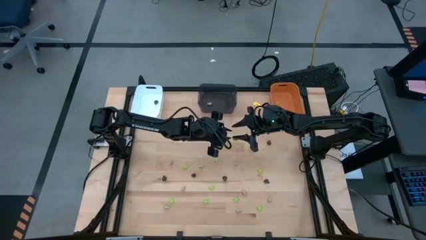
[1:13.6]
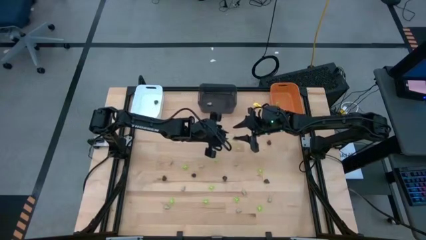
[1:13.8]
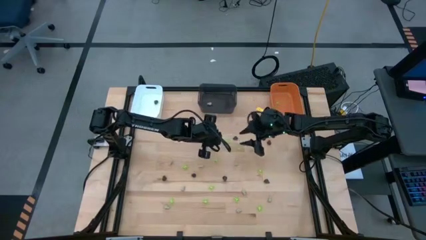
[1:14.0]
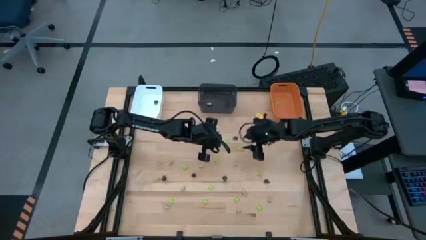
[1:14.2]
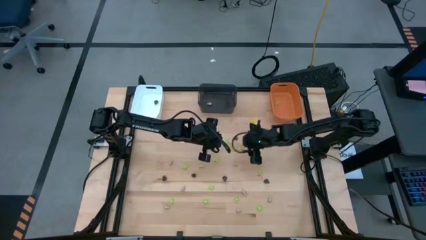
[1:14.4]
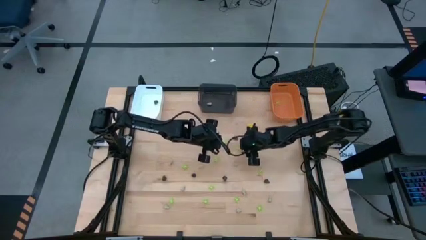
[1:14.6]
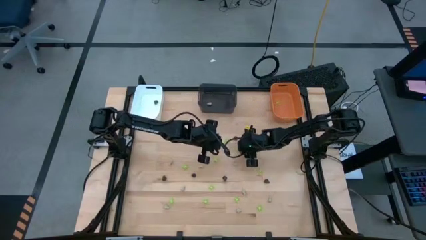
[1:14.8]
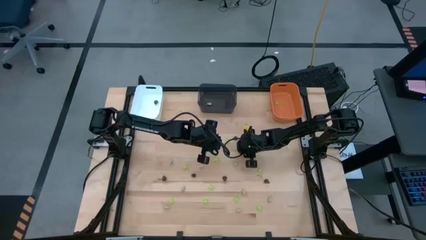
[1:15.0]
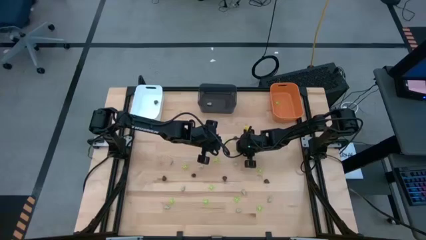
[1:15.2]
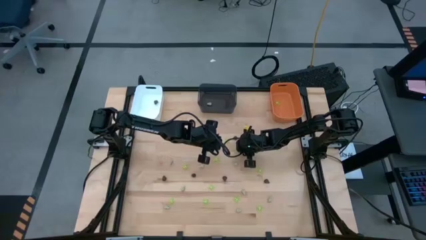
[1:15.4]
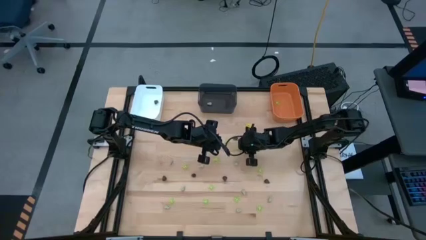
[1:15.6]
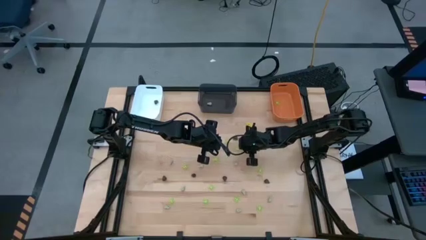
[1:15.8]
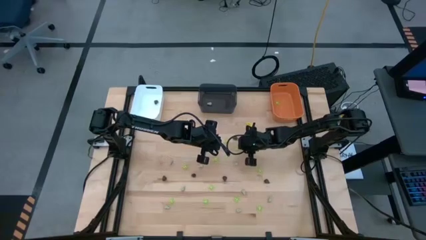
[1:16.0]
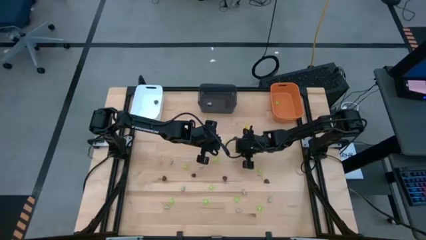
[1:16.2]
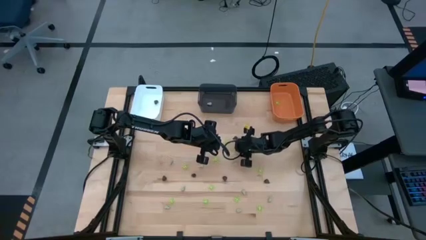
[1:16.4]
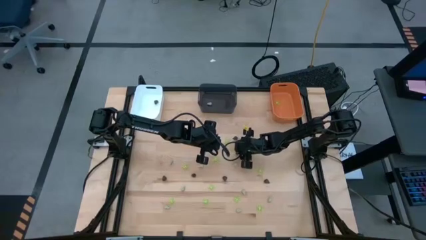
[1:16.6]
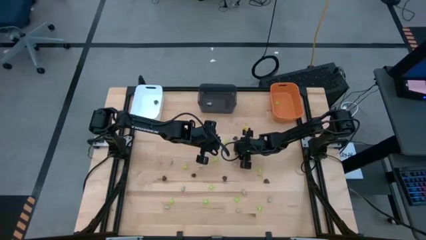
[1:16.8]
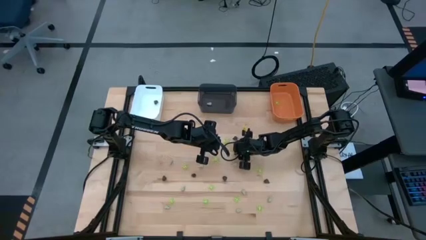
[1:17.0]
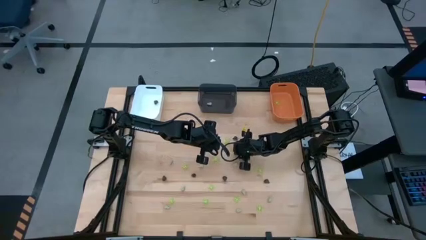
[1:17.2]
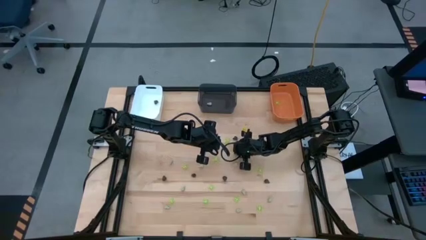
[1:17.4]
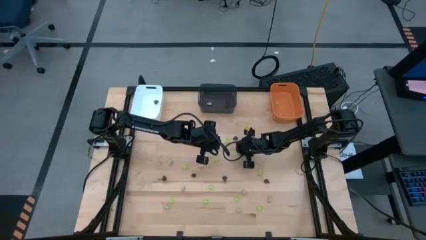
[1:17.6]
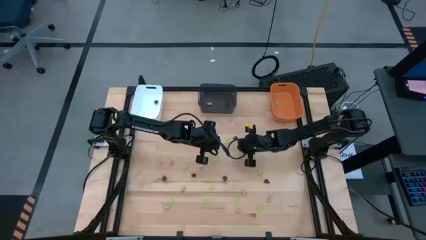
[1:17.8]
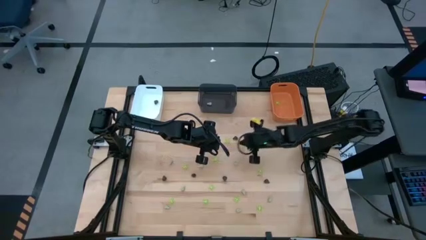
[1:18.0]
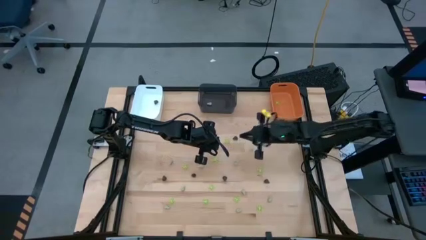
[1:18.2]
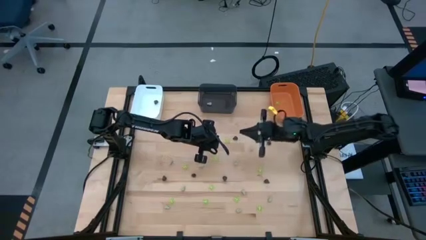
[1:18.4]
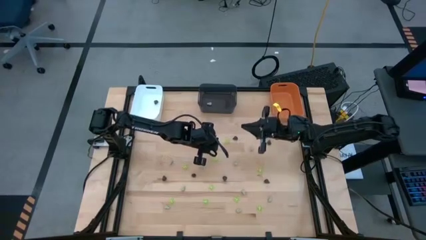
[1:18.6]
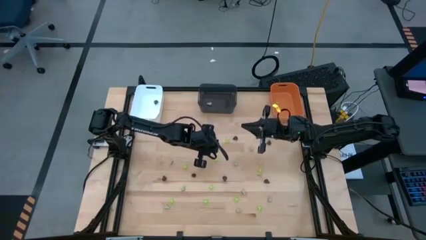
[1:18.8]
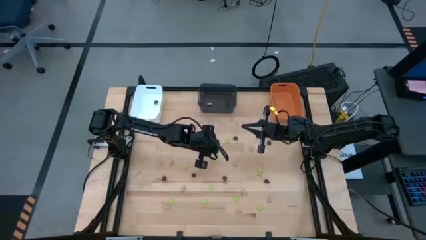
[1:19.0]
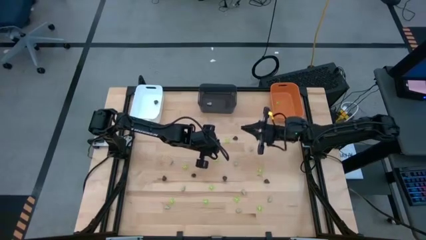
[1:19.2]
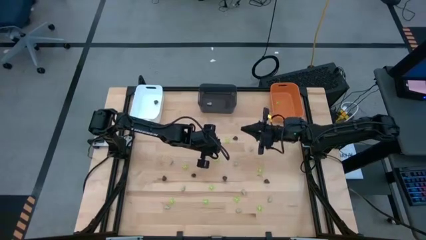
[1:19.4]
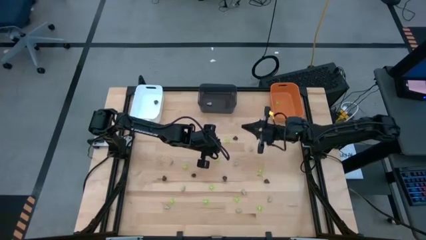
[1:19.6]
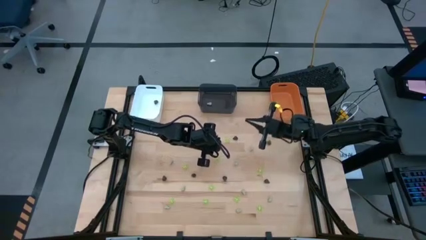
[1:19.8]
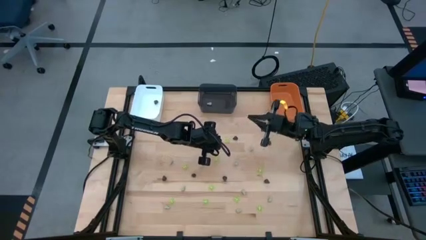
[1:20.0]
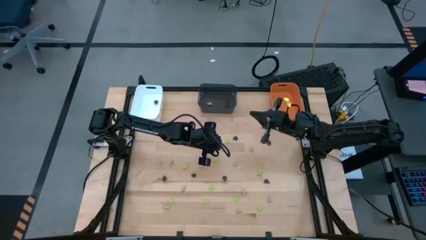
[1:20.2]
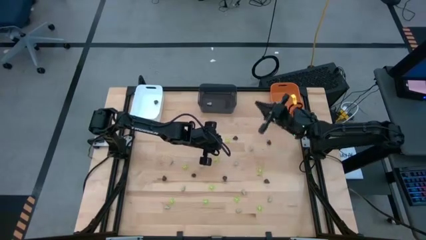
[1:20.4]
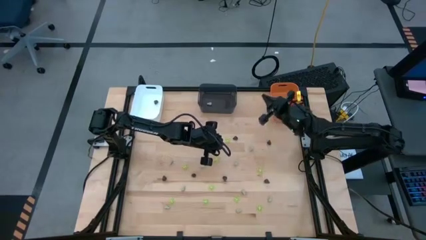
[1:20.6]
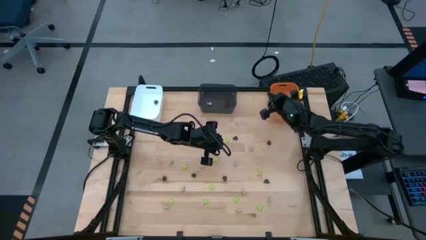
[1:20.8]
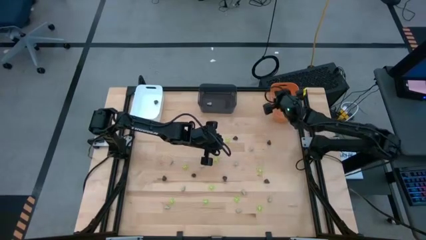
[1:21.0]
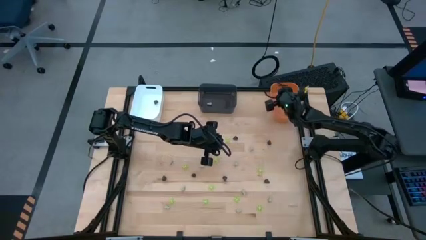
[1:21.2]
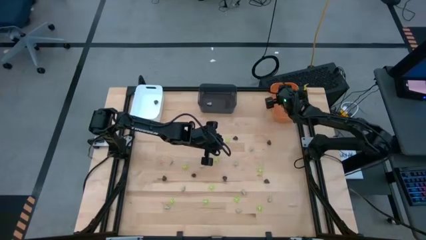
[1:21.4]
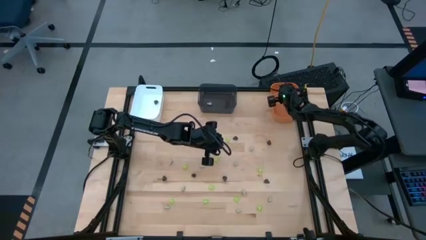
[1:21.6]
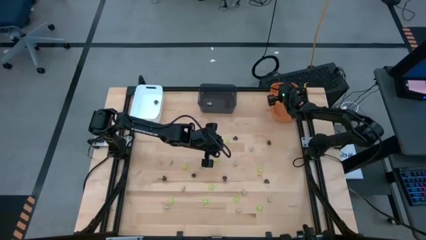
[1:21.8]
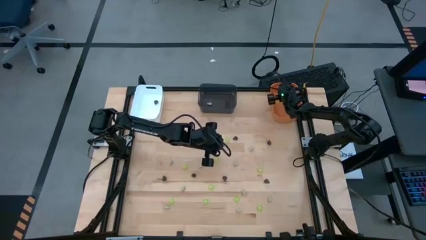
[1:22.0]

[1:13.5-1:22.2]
Task: Sort Halloween decoration
Put the green toy spider into the orange bin

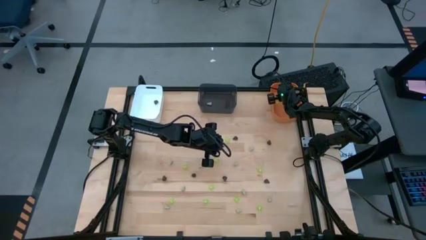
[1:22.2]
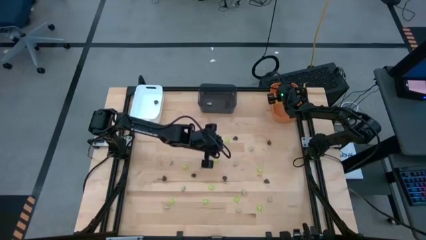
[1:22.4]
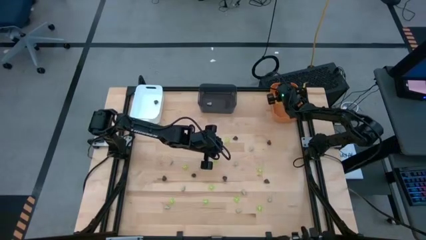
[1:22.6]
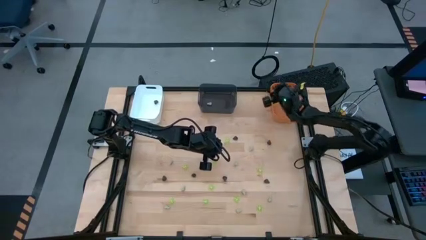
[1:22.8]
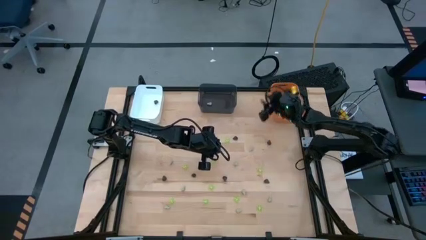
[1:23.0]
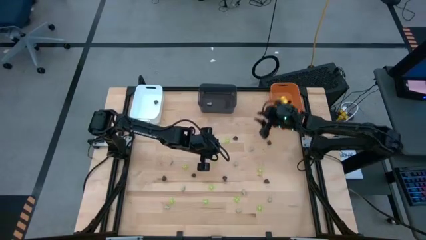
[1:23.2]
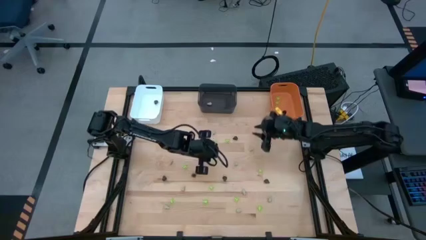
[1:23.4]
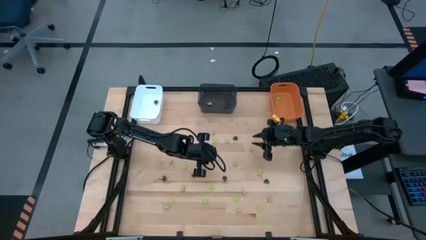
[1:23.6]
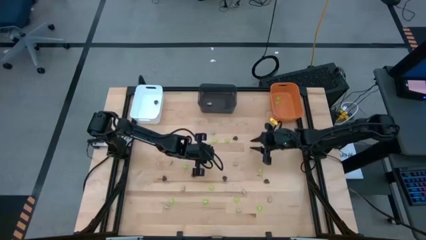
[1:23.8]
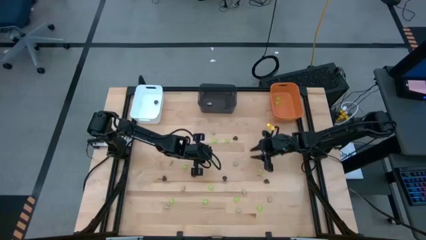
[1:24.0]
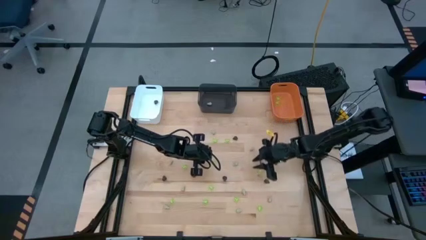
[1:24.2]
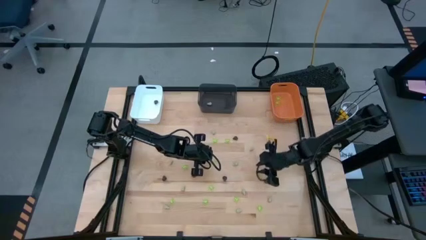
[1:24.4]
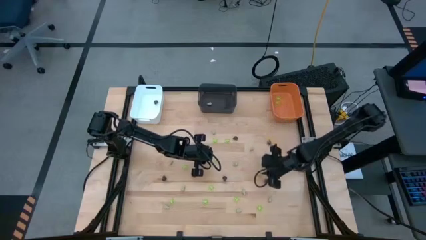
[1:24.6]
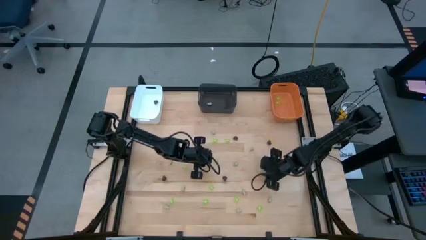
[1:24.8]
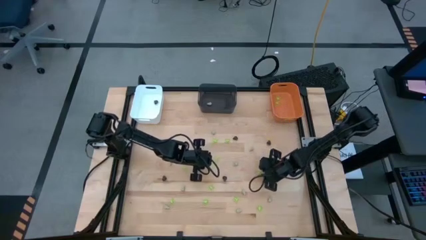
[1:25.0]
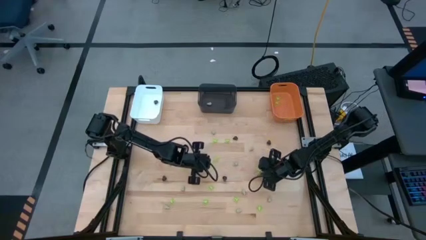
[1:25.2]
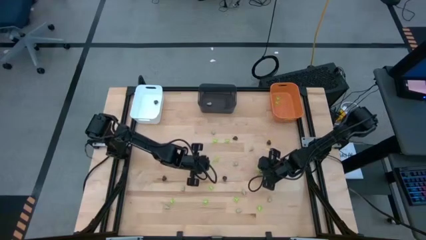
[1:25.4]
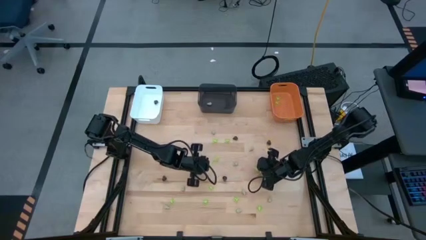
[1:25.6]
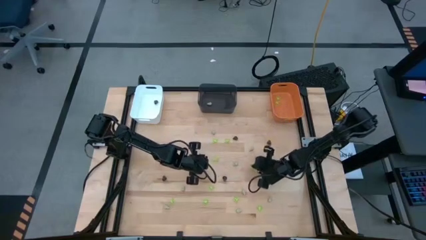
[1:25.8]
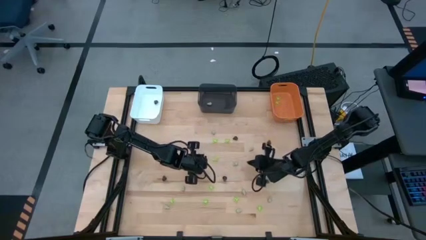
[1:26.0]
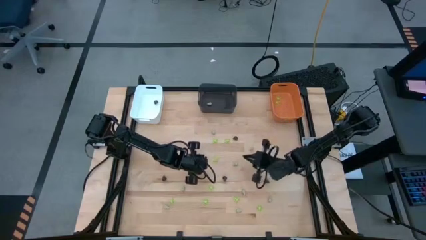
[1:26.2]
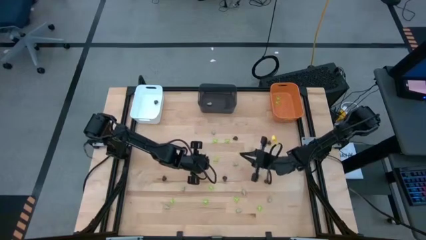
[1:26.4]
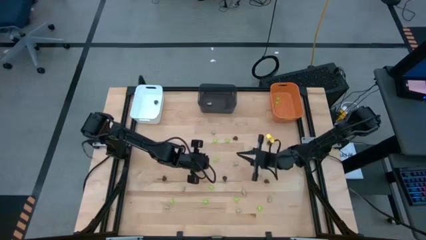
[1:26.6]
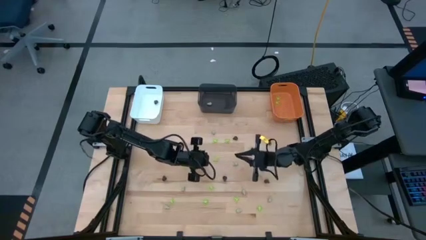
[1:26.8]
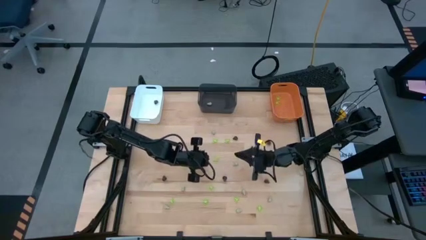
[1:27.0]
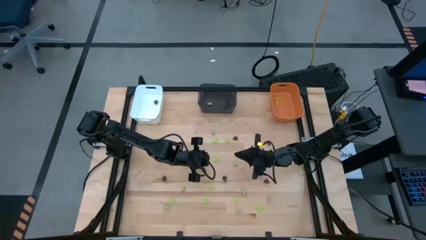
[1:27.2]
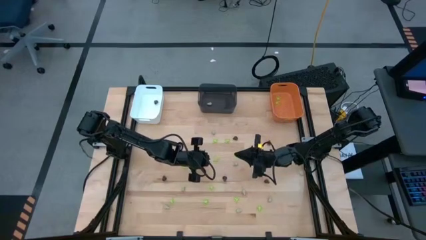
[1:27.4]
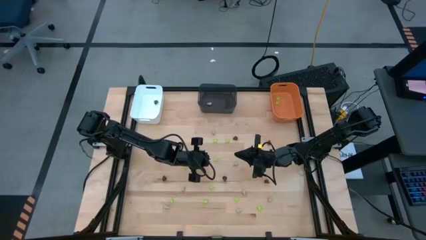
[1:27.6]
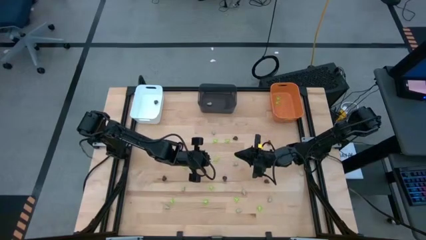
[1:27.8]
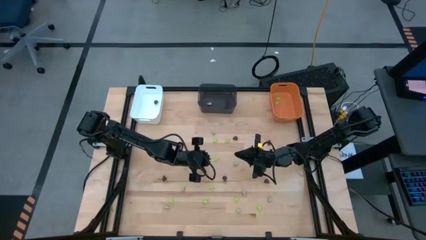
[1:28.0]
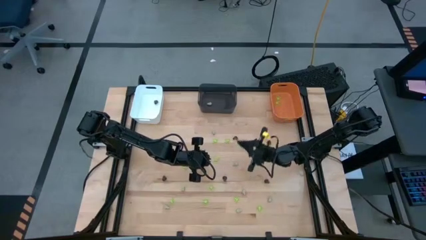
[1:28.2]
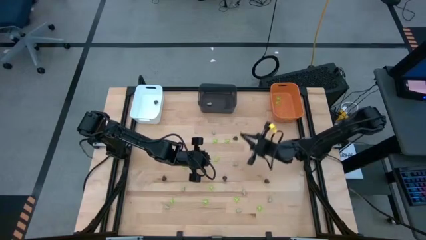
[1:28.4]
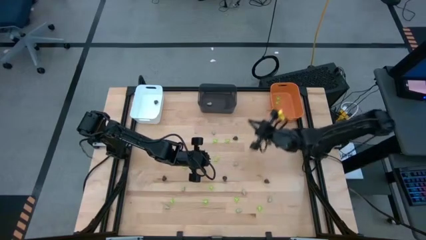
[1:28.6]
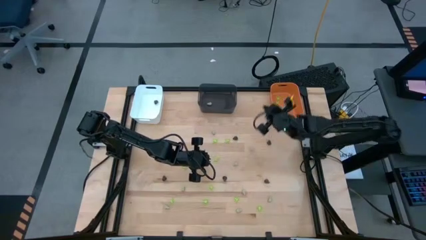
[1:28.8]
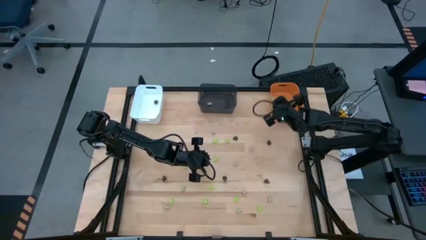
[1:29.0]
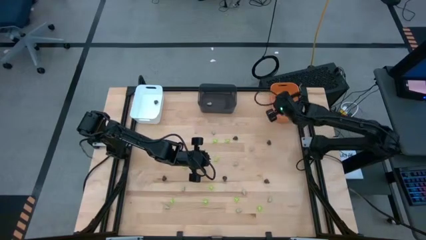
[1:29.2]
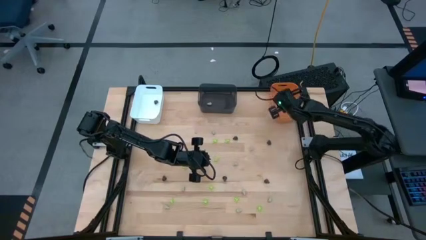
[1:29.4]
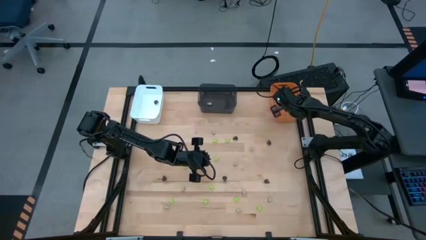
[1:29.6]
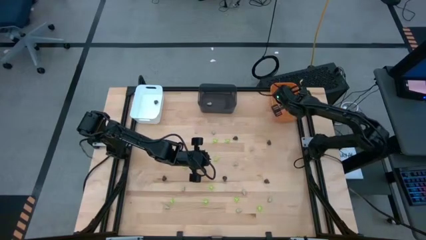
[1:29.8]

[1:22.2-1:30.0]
Put the green toy spider into the orange bin
